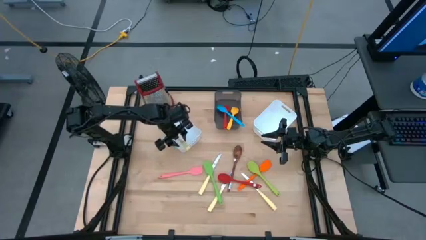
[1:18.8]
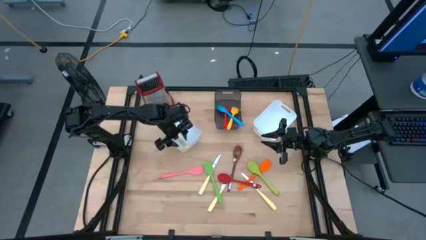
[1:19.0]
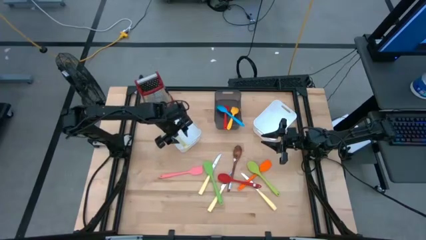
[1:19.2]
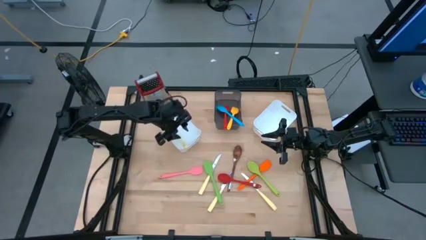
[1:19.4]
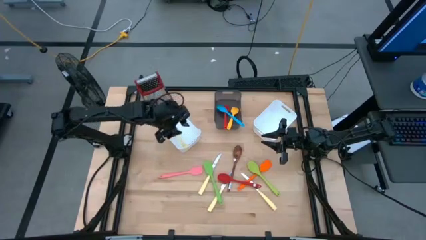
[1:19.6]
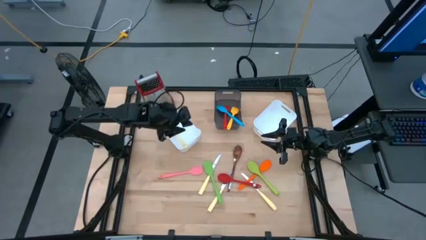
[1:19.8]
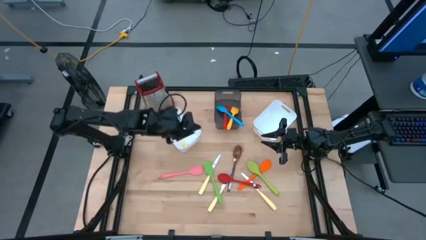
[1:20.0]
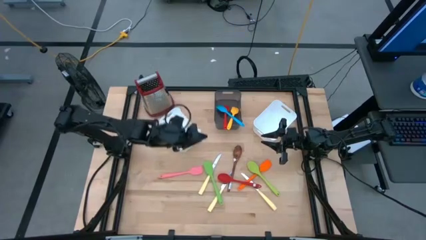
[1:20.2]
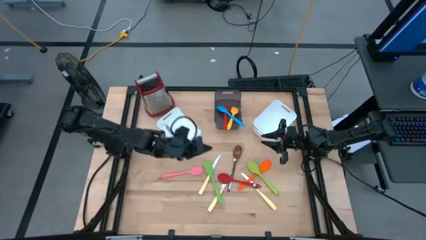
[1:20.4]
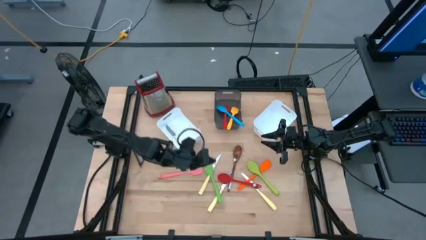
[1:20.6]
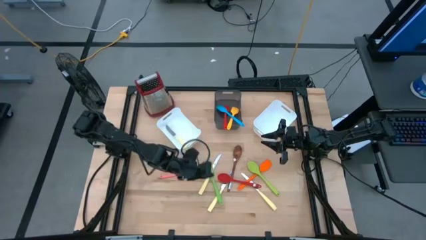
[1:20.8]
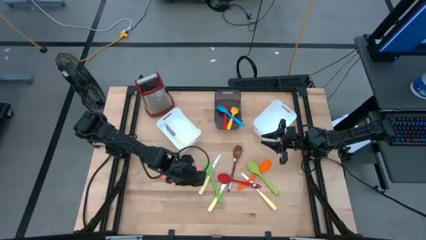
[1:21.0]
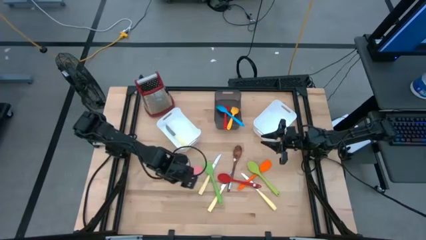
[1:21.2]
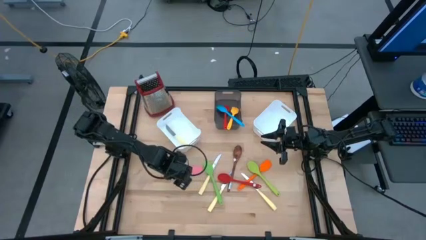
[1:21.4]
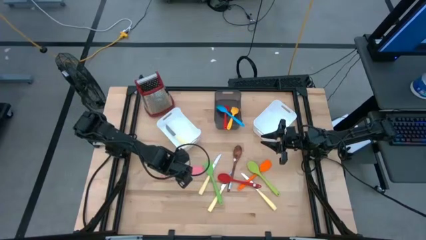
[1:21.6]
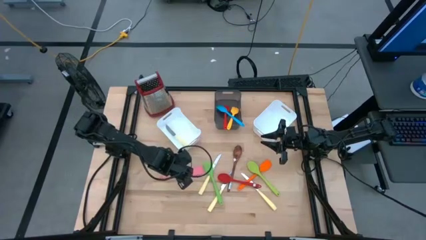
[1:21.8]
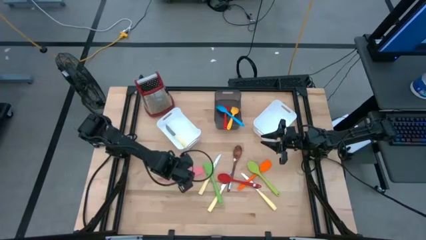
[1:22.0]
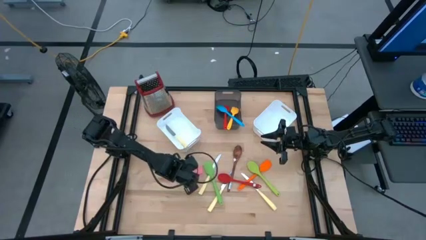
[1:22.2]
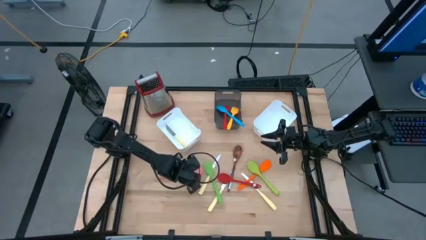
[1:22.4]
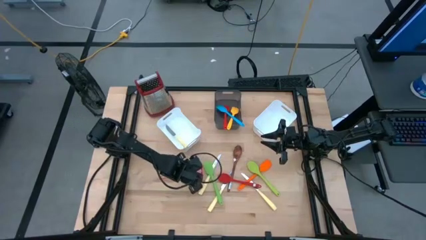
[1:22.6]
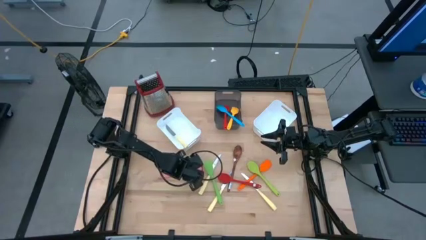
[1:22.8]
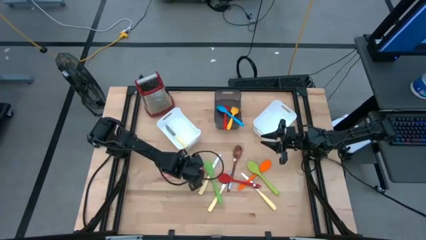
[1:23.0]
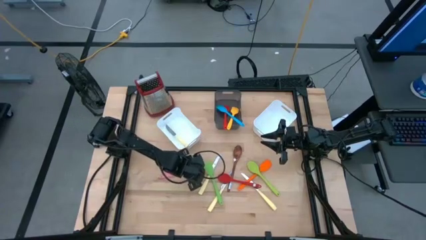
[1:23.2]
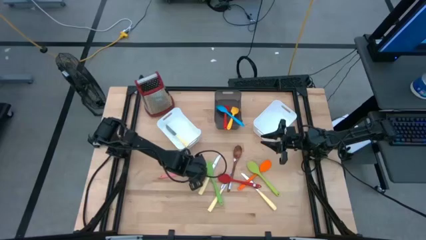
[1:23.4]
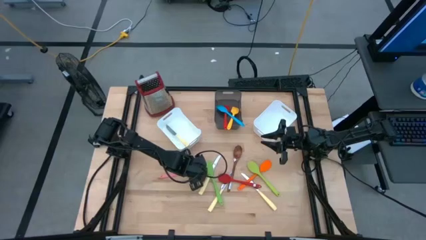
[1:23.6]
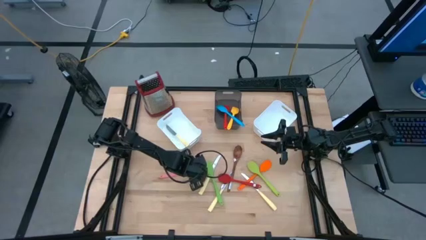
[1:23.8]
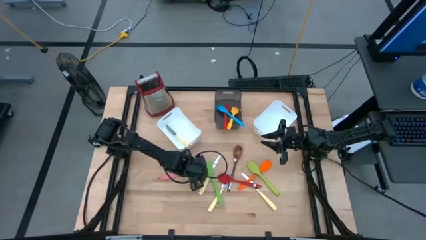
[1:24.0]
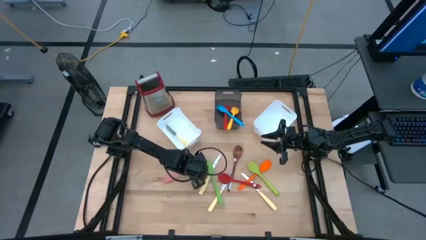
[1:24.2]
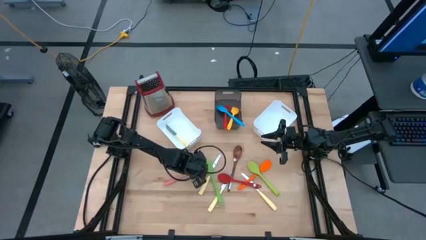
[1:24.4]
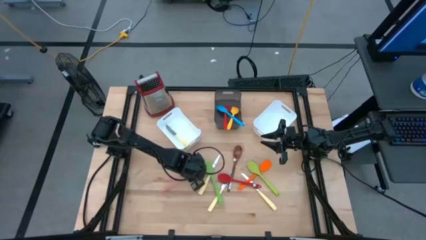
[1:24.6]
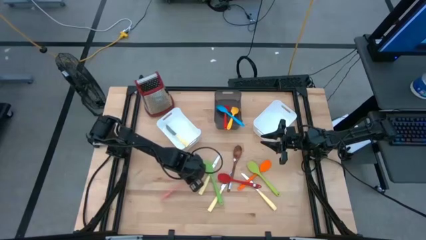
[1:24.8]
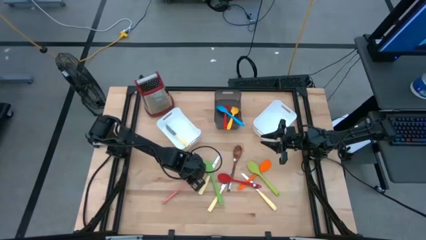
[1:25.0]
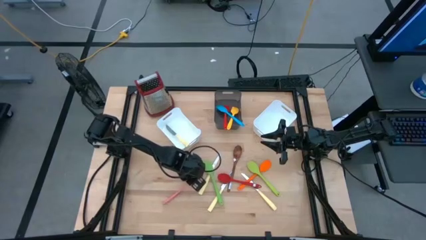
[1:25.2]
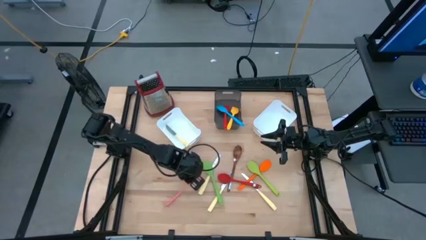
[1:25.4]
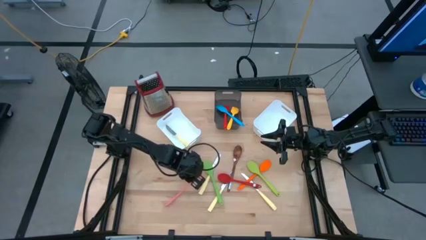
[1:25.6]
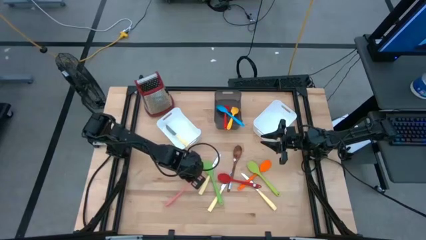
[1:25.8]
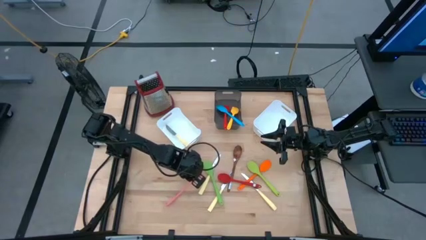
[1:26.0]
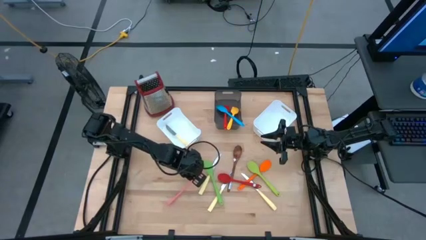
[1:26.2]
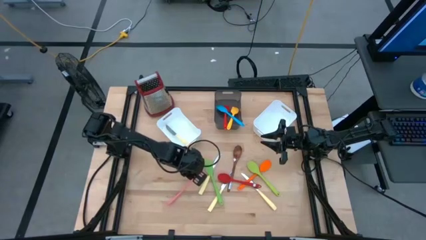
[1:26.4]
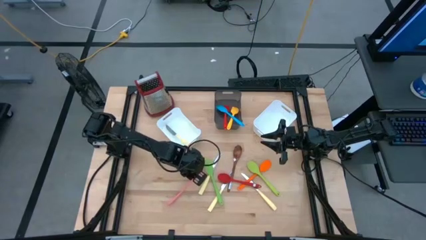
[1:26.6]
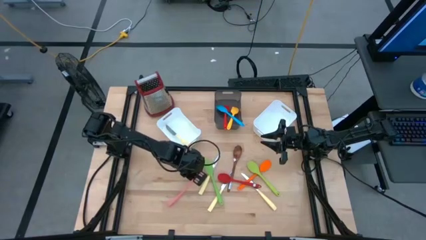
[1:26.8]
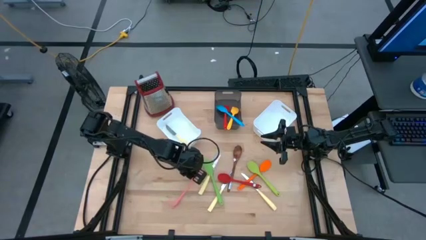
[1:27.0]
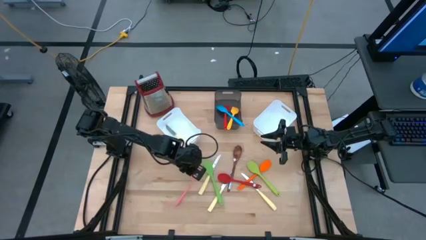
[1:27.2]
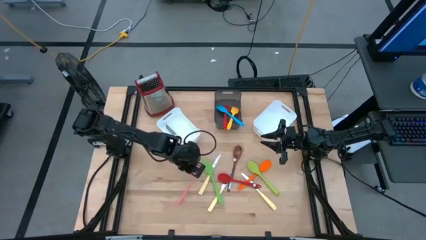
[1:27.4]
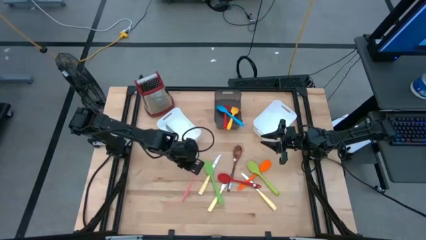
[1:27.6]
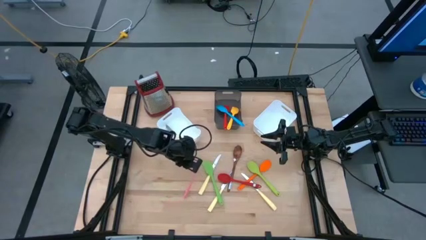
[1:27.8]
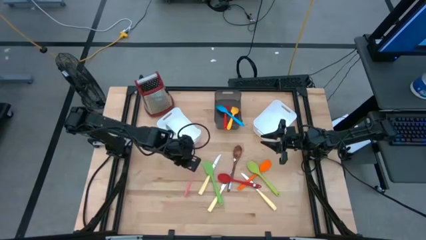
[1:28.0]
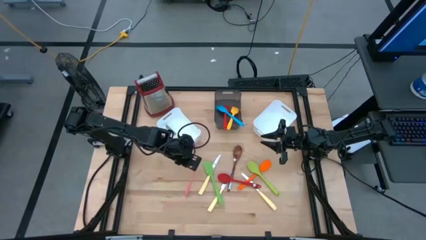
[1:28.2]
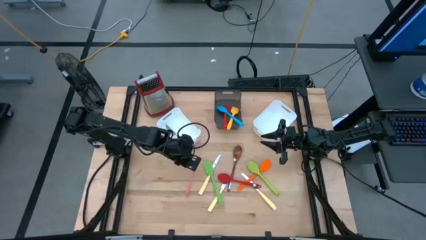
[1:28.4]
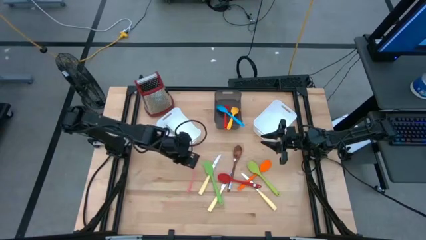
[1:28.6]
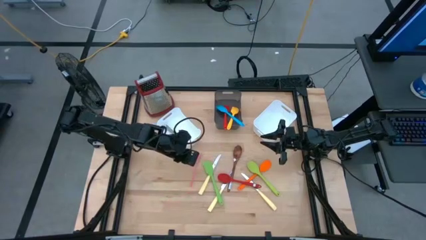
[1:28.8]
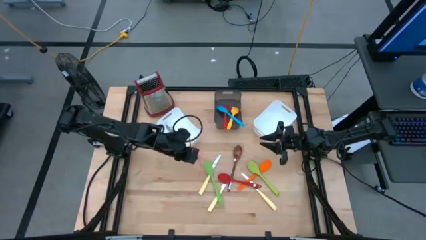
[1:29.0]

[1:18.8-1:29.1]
Task: Pick & Place Kitchen Items
Put the pink spatula into the black bin

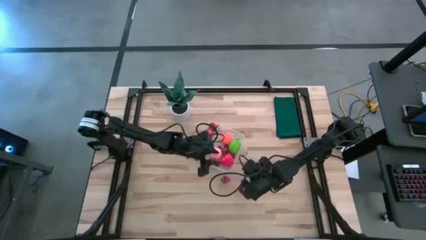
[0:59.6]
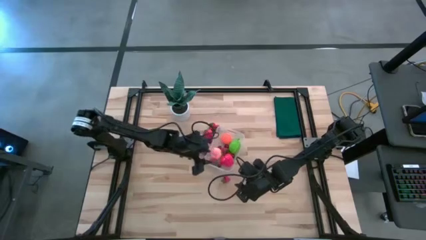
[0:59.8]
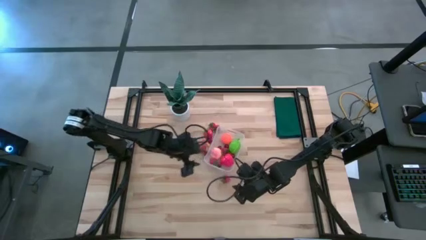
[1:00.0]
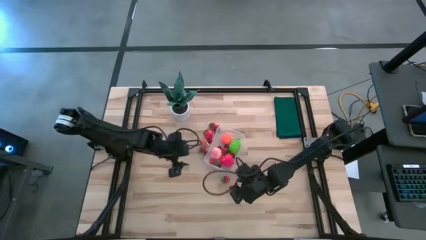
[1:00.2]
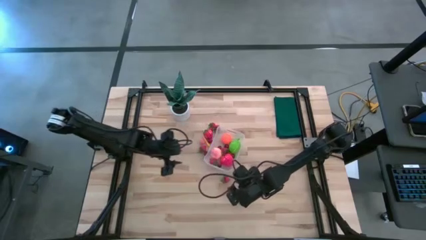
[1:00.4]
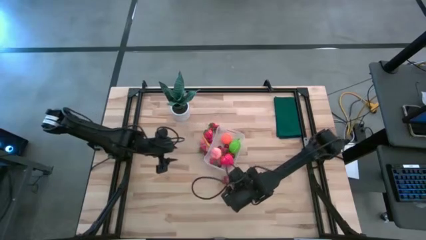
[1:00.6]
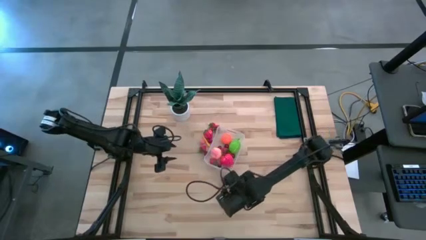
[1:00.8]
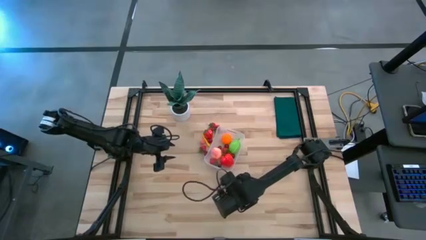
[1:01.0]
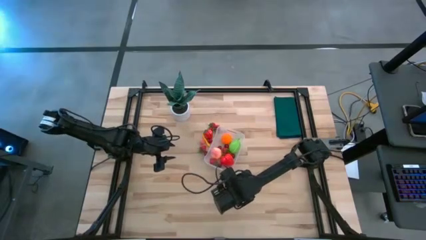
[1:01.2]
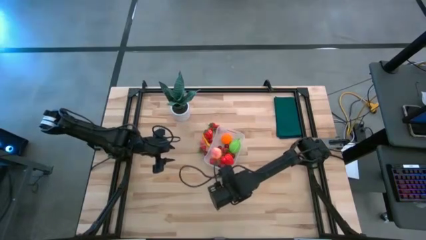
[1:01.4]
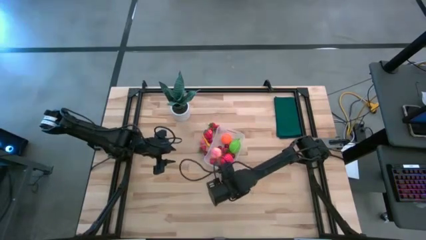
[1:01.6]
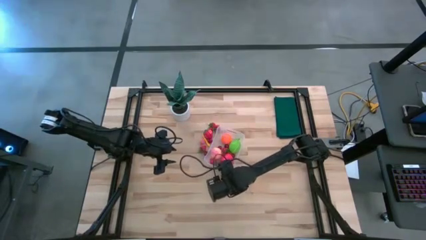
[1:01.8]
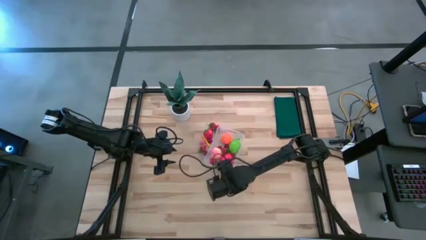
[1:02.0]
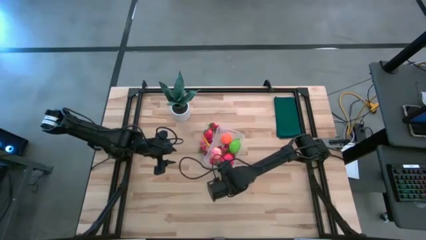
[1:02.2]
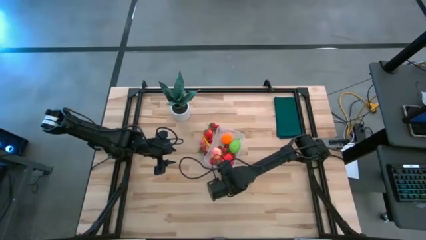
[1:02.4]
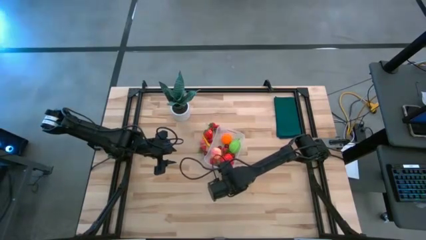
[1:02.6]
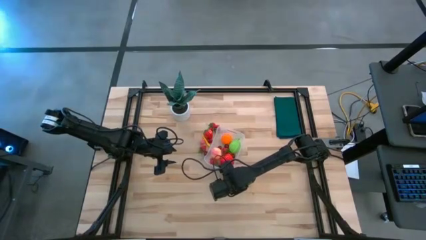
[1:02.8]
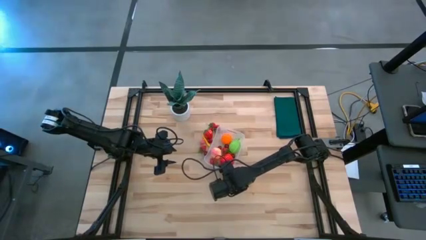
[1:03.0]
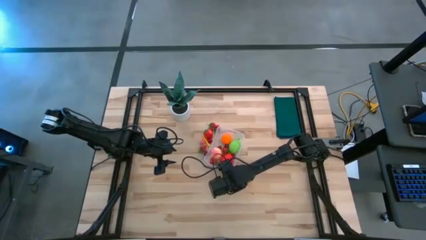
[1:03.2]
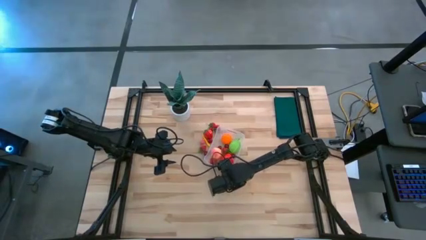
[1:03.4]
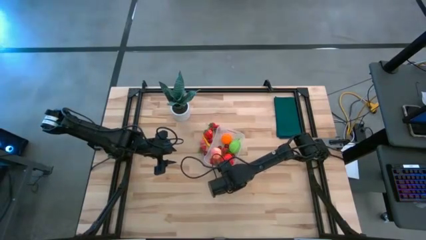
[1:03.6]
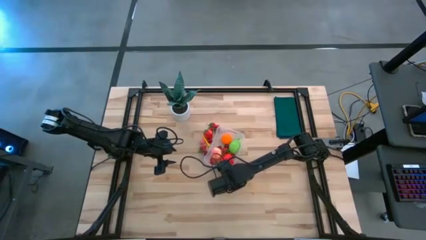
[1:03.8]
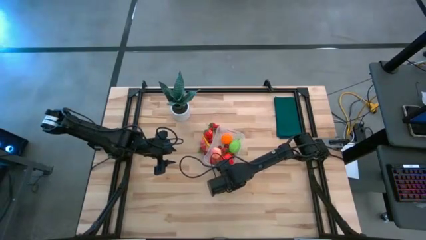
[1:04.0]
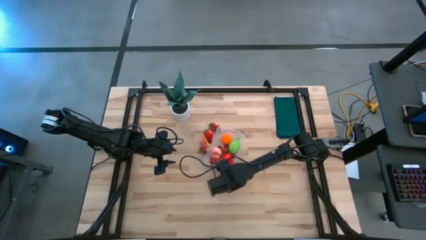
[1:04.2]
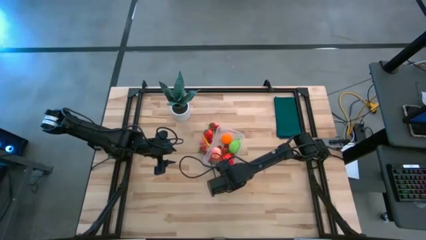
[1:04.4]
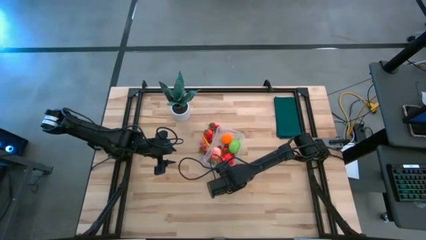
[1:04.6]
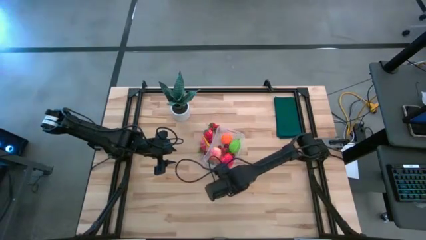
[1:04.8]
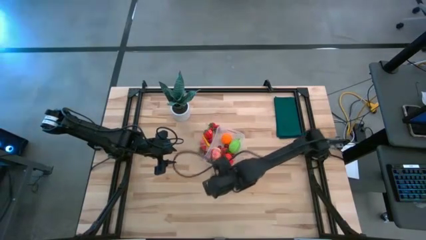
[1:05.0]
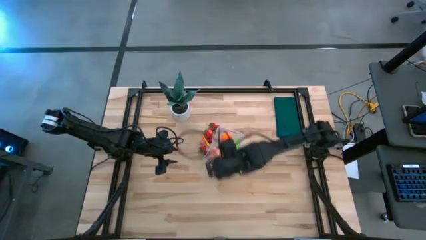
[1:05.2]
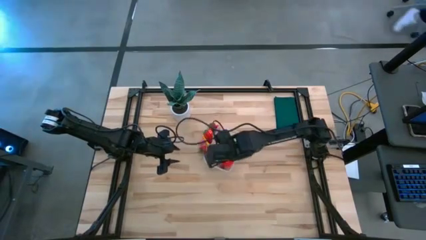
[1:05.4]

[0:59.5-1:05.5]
Task: Pick and placing Produce into tupperware
Put the red strawberry into the container
